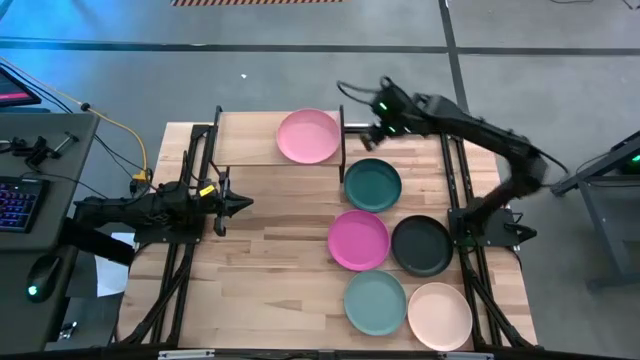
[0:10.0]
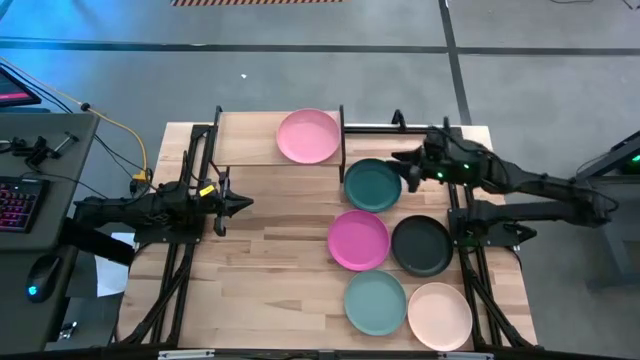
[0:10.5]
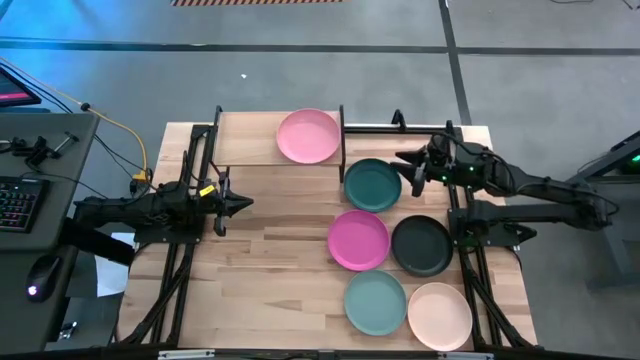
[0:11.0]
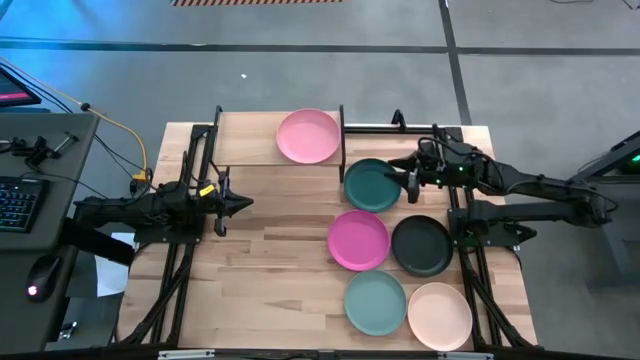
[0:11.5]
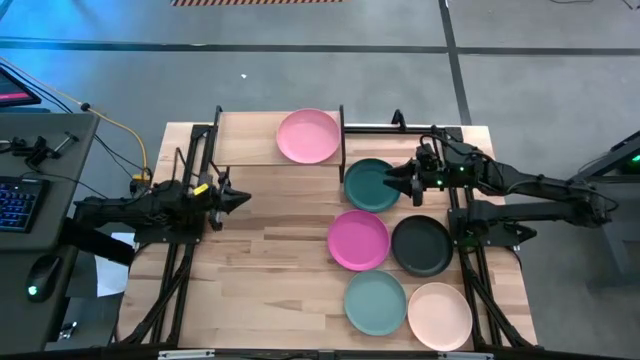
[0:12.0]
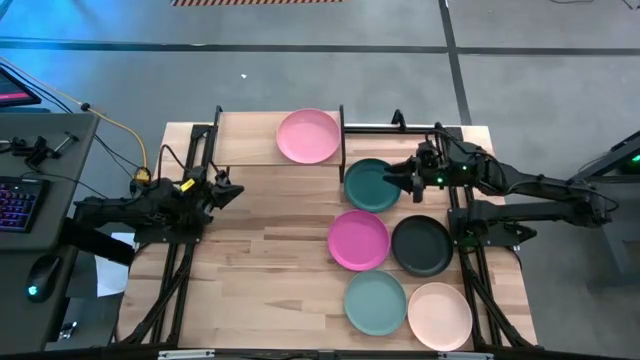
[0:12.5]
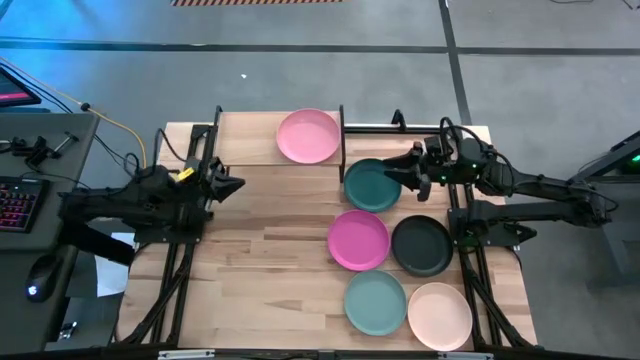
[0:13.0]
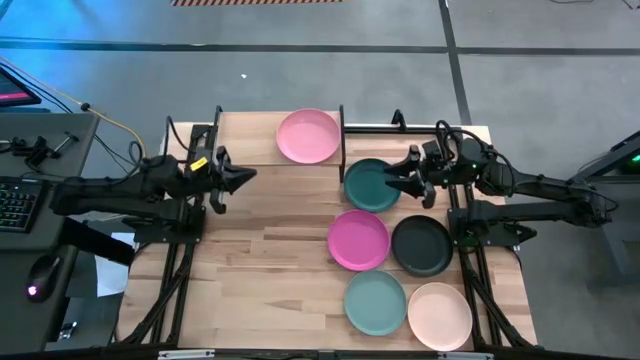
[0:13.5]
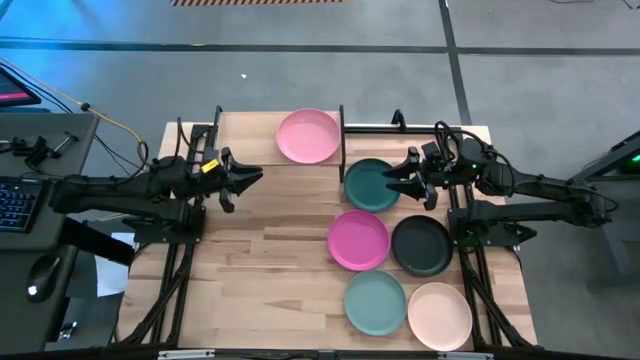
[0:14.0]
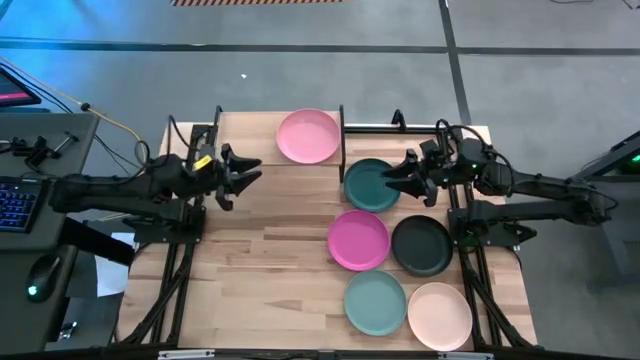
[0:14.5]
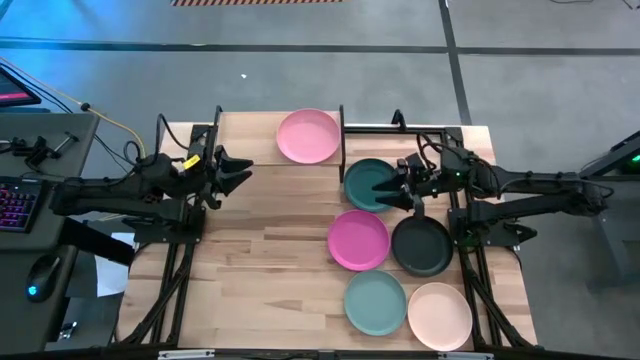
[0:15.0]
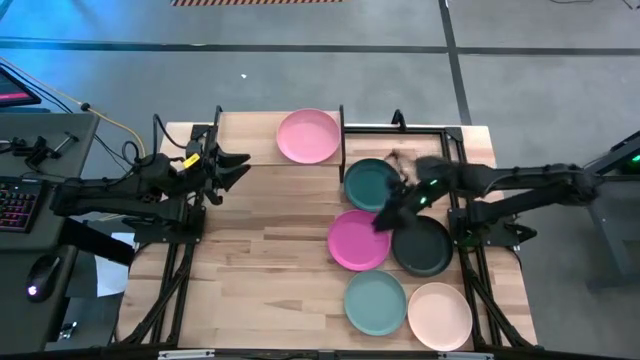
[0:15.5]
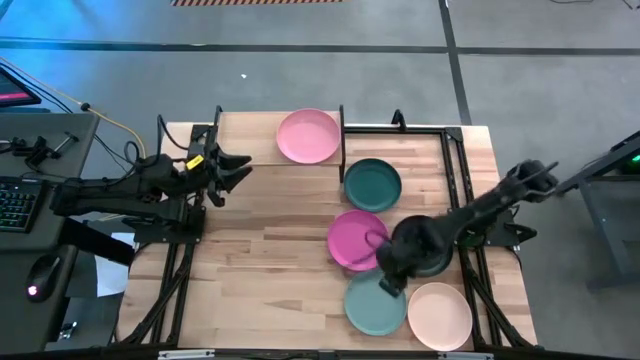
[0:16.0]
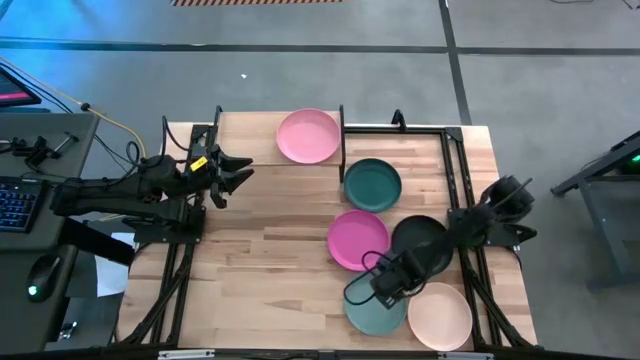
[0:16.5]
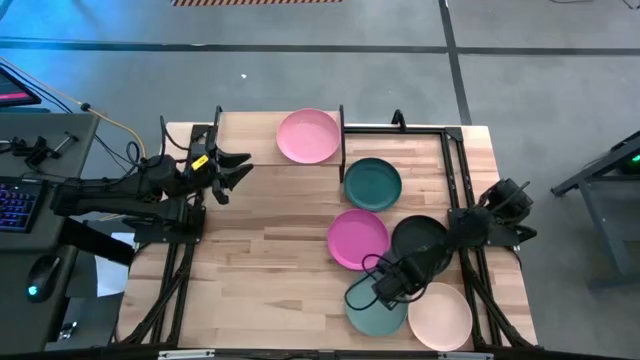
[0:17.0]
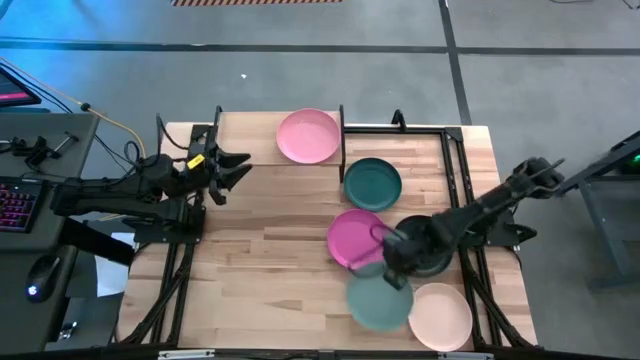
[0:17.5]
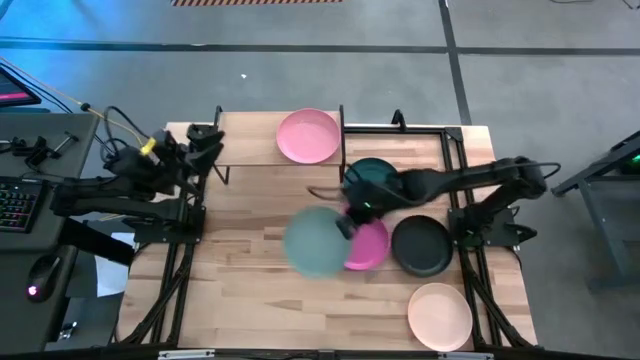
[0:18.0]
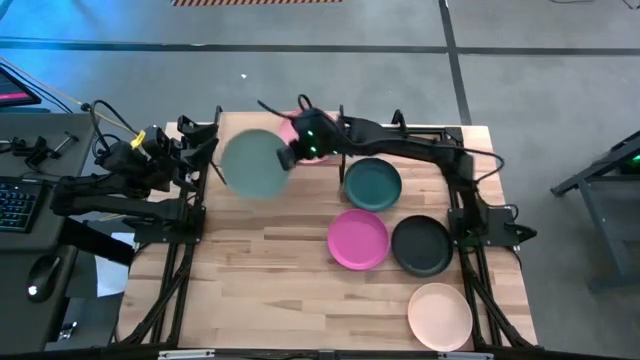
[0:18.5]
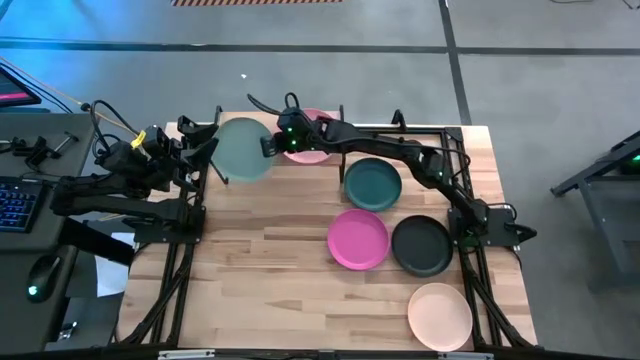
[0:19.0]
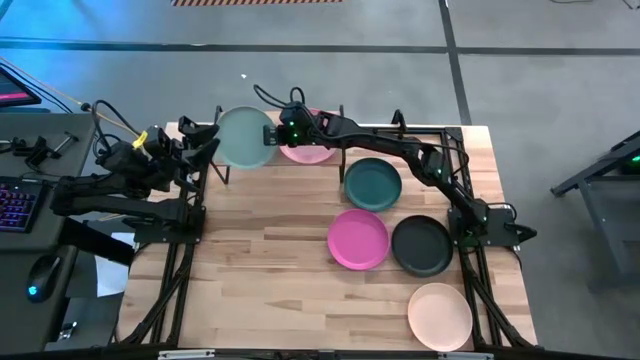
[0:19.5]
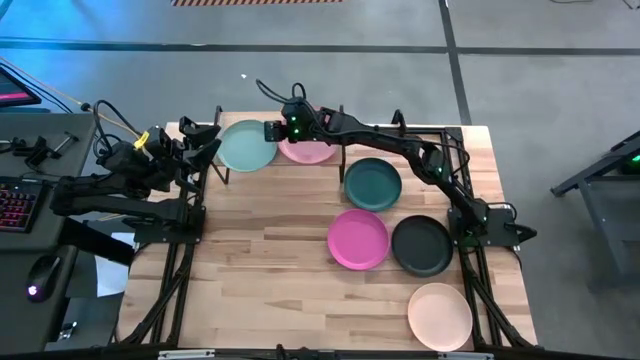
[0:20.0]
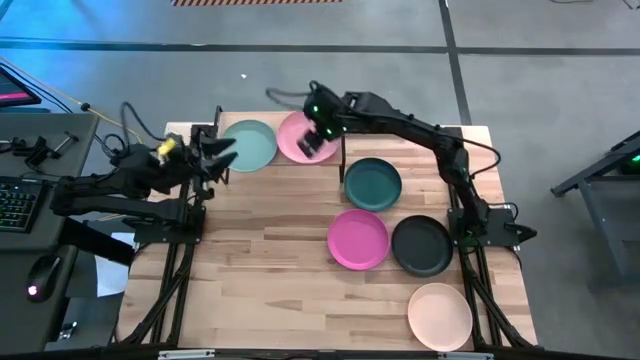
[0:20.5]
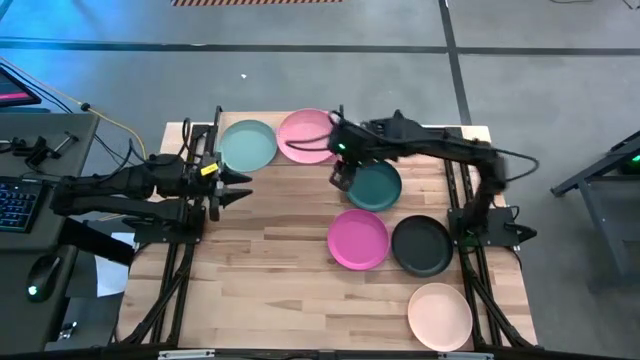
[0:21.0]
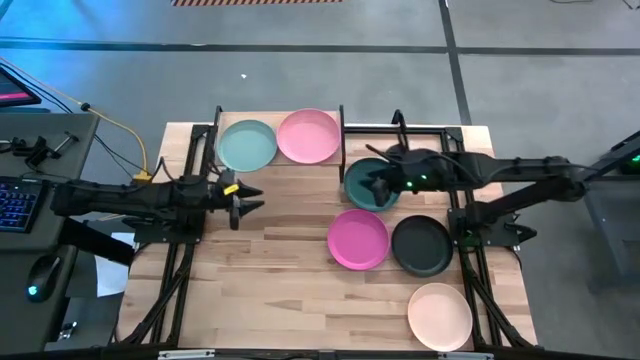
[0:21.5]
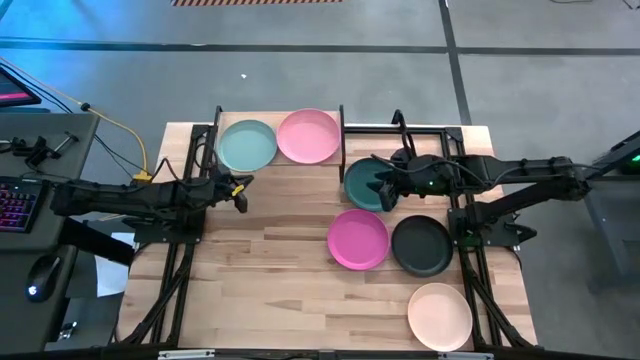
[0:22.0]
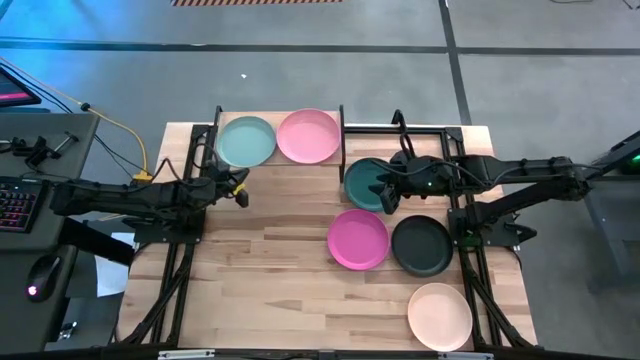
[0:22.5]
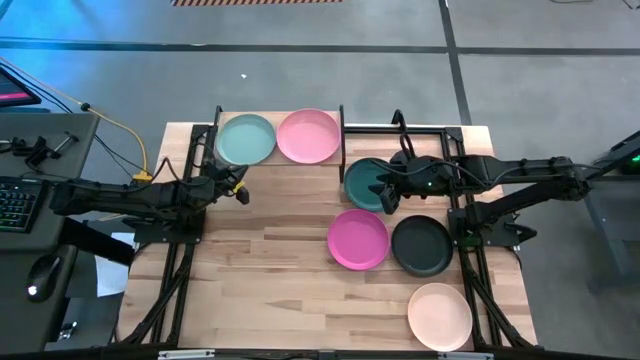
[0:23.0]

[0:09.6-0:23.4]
Task: Place and stack plates onto a shelf
Put the blue plate on the shelf

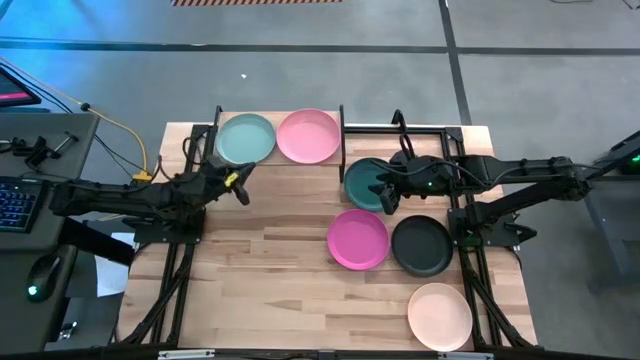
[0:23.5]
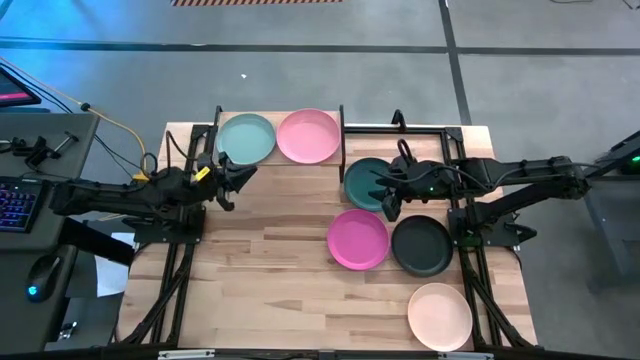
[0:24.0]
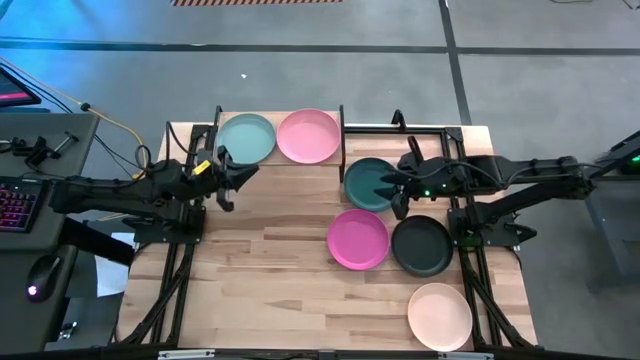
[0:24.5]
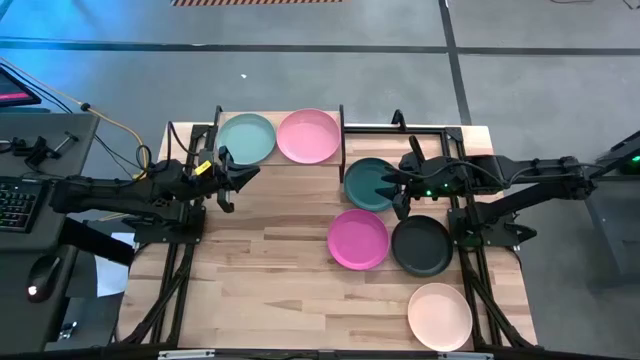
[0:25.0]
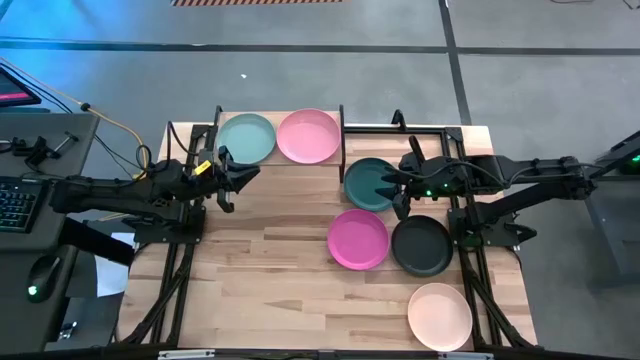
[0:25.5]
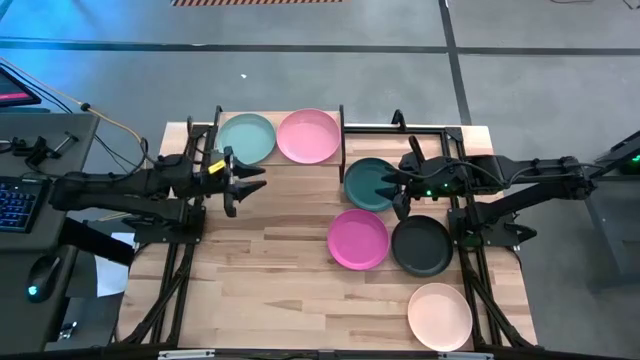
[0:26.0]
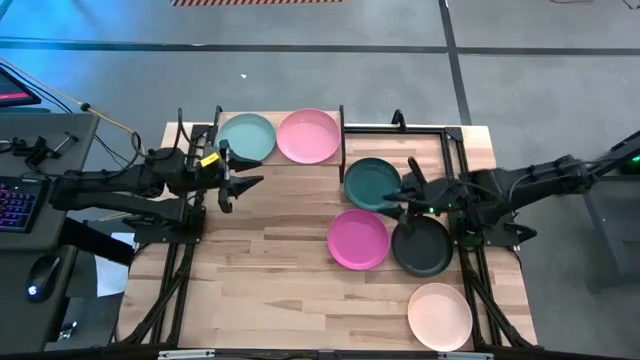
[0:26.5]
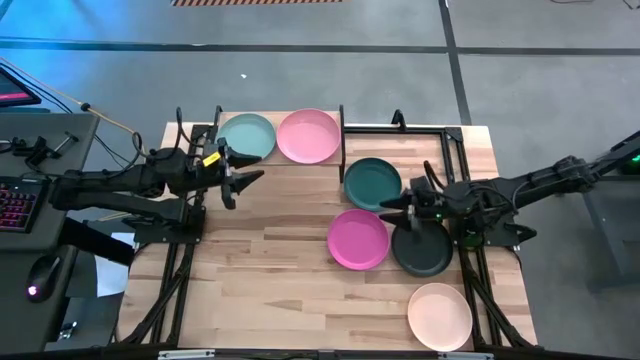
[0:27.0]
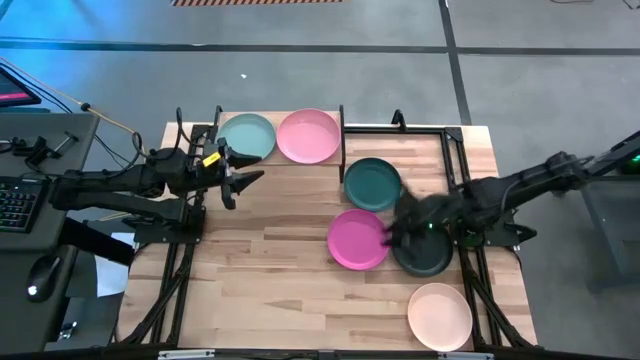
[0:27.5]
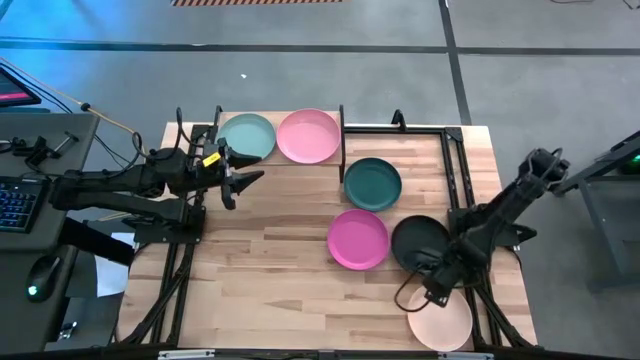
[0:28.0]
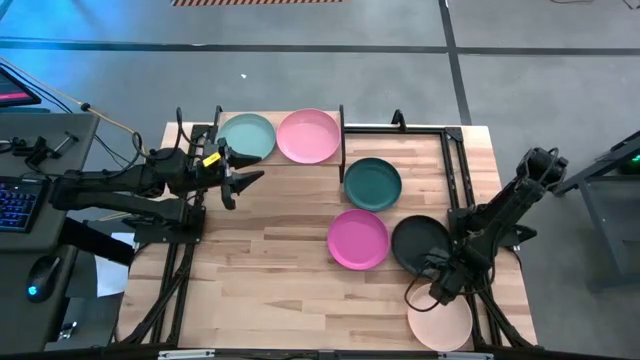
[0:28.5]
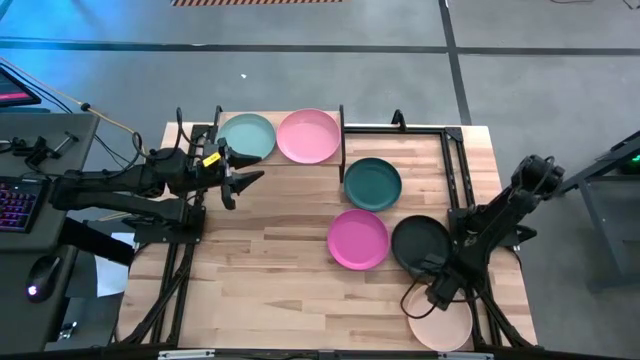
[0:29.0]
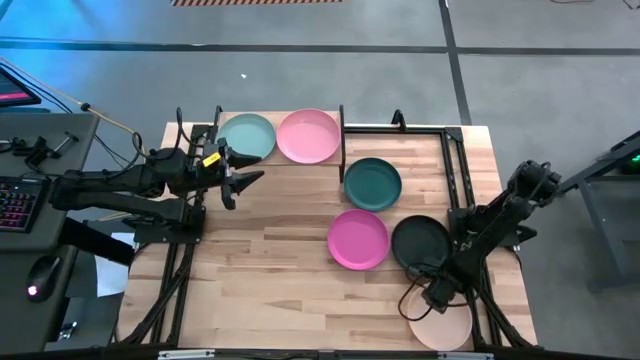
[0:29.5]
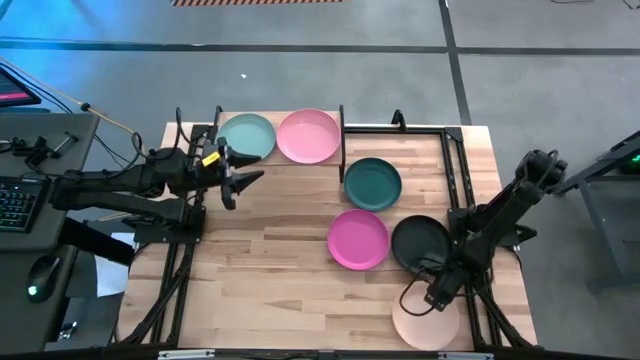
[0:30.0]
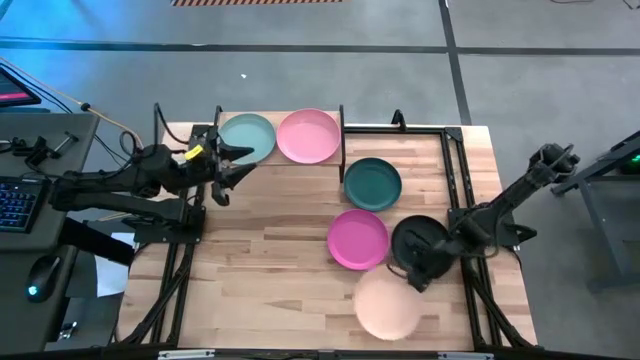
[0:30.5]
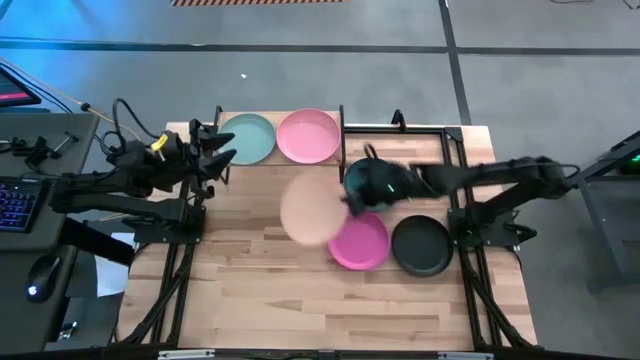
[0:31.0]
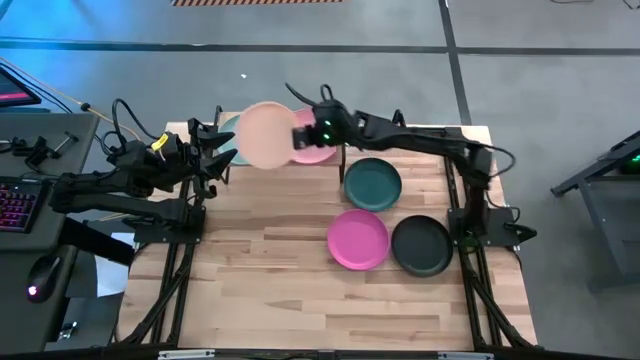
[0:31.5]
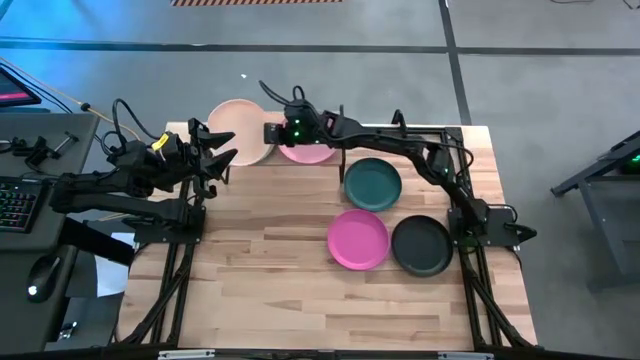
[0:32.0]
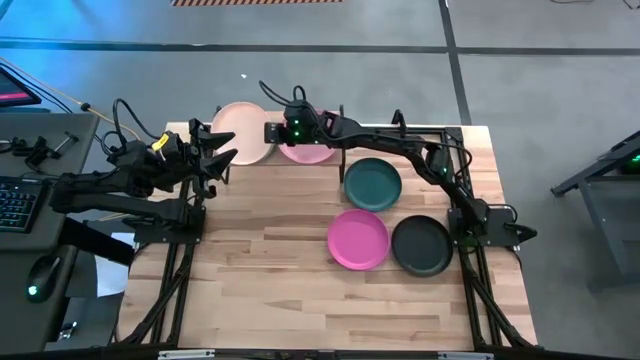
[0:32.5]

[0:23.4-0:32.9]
Stack the light red plate on top of the blue plate
